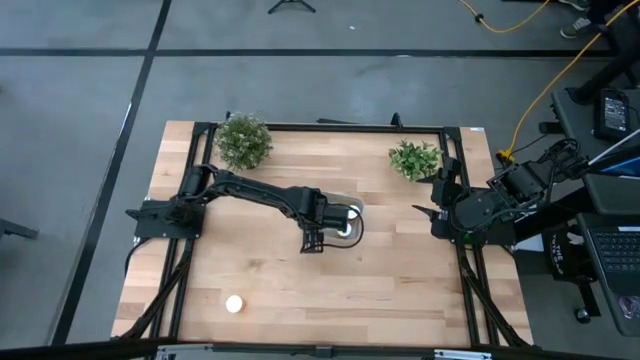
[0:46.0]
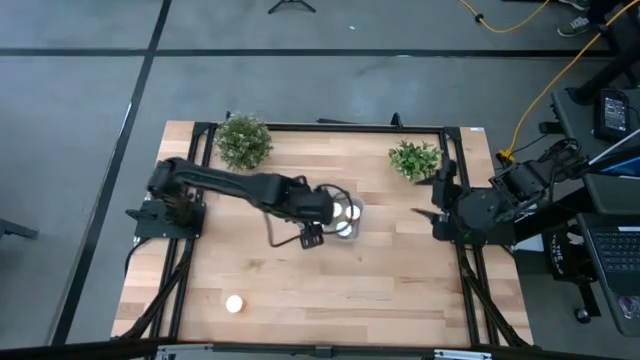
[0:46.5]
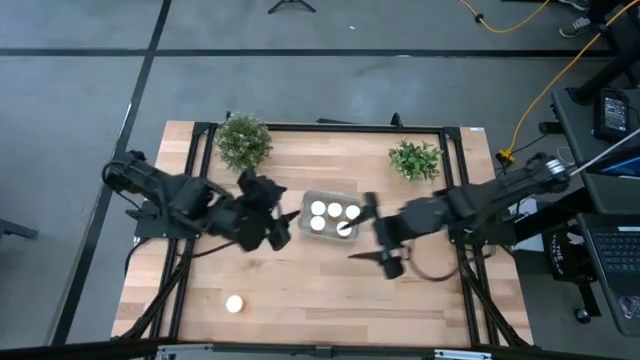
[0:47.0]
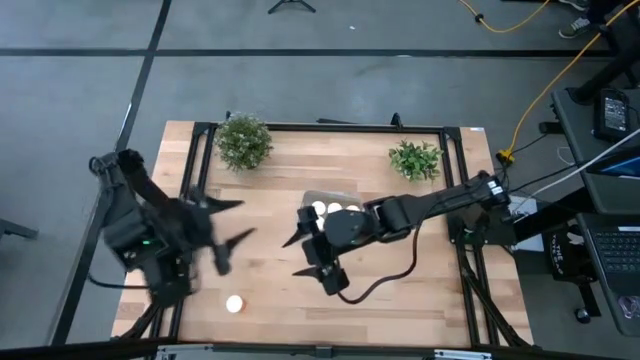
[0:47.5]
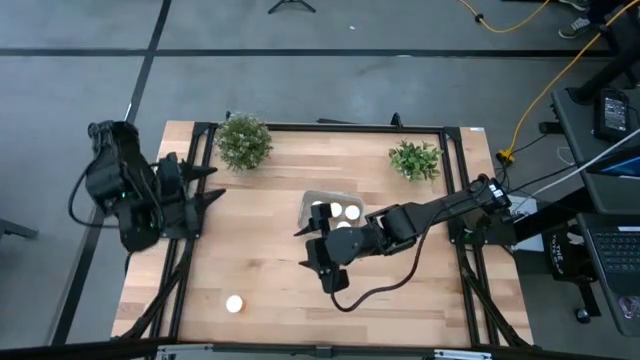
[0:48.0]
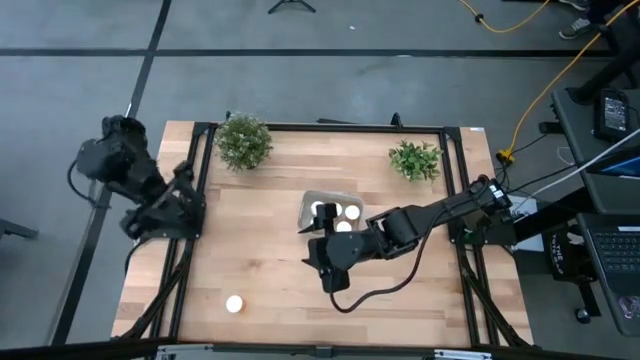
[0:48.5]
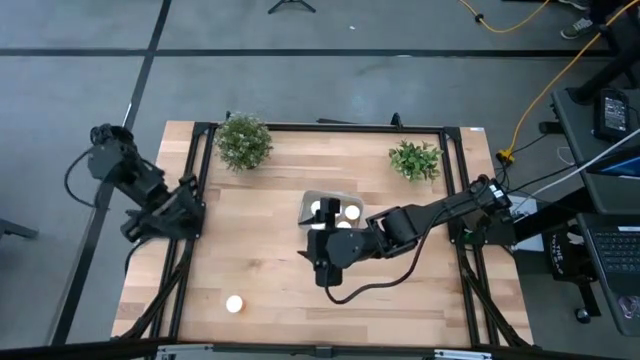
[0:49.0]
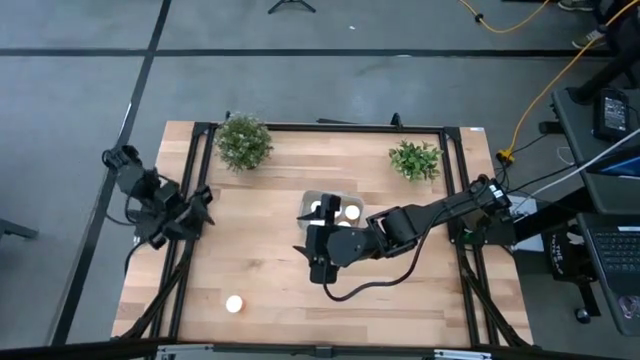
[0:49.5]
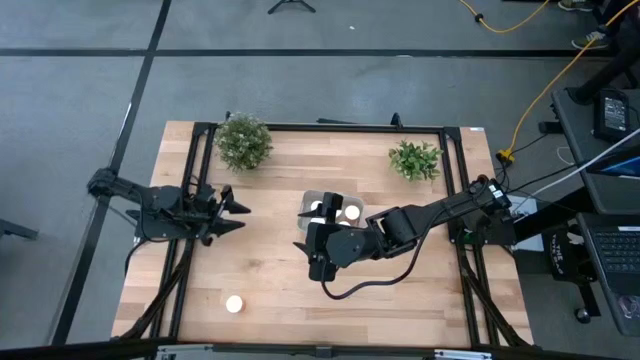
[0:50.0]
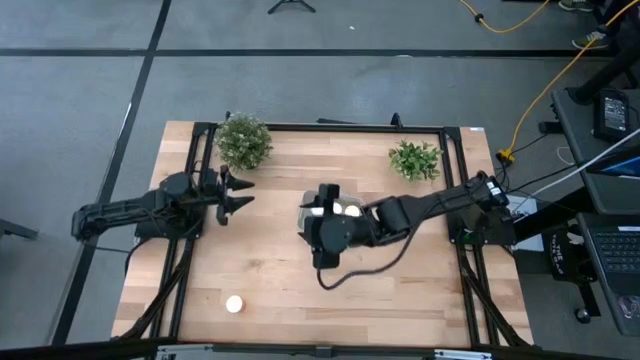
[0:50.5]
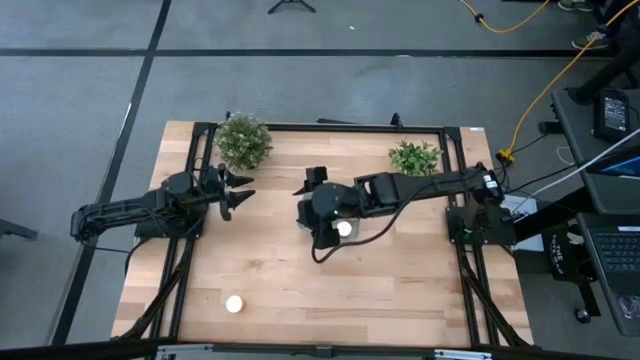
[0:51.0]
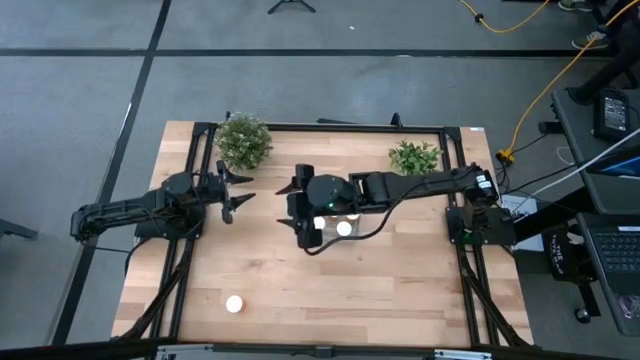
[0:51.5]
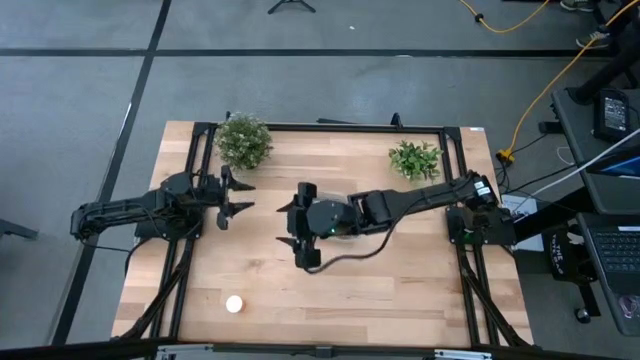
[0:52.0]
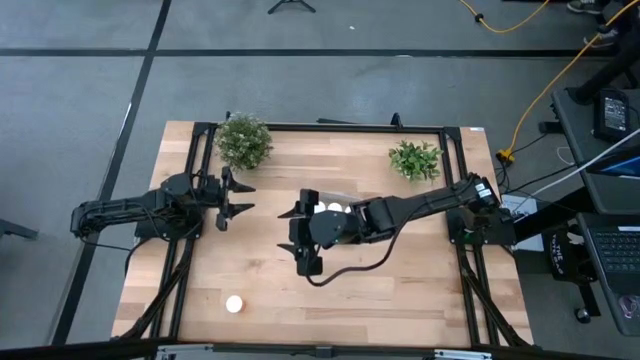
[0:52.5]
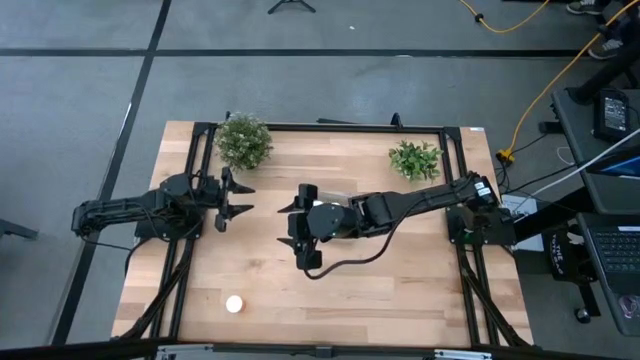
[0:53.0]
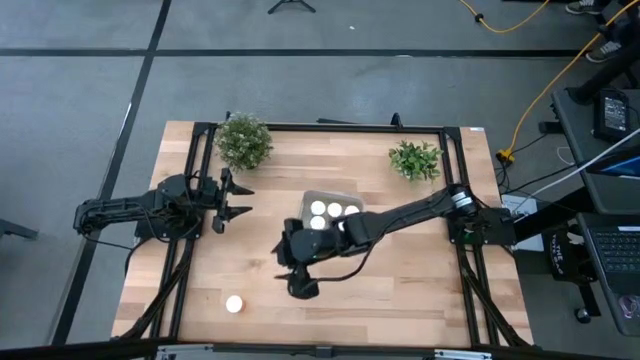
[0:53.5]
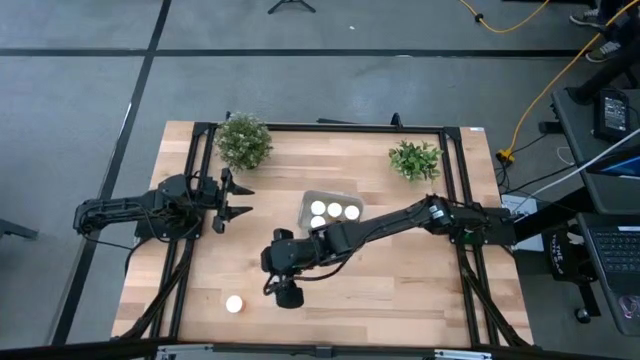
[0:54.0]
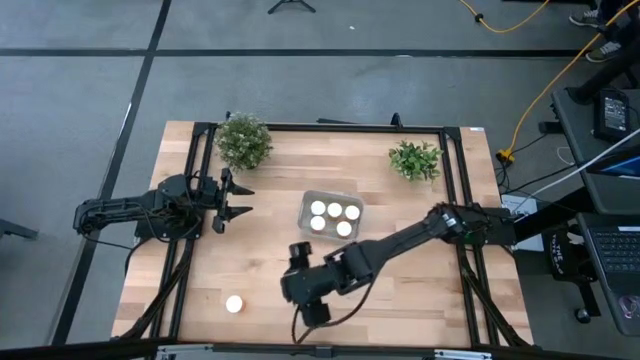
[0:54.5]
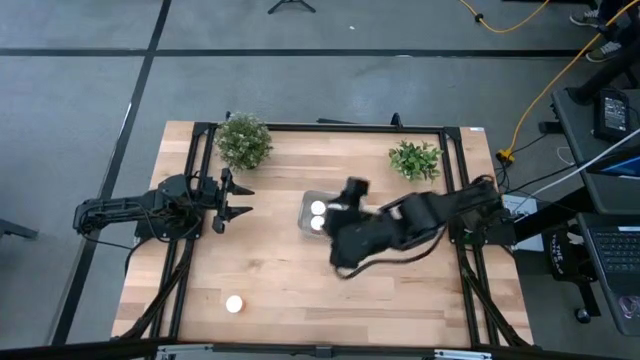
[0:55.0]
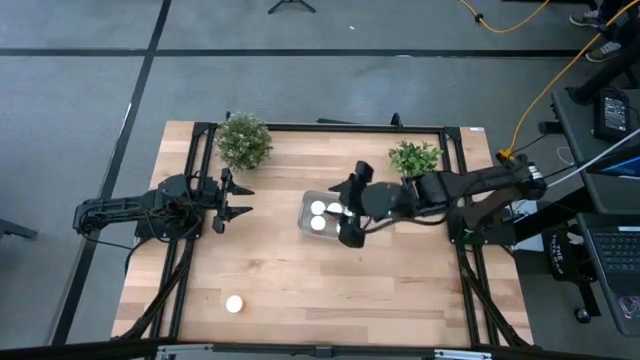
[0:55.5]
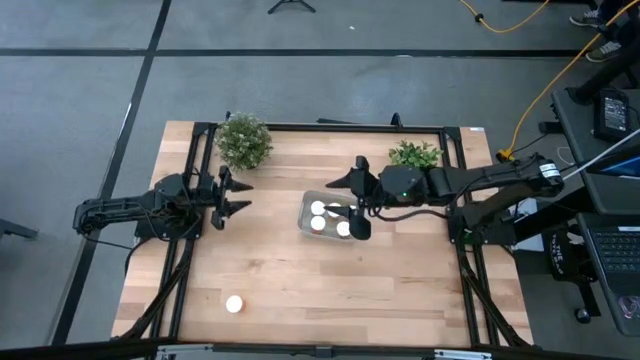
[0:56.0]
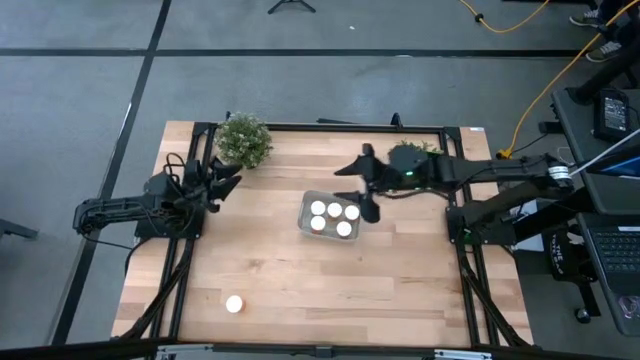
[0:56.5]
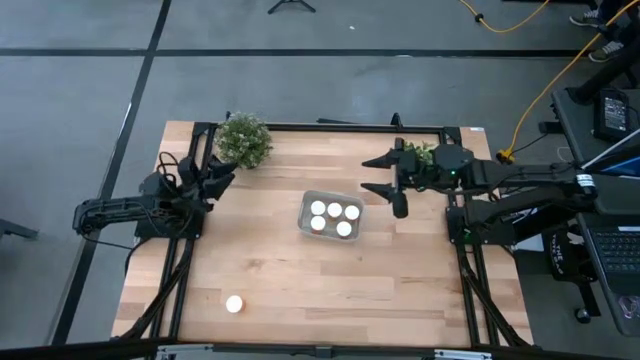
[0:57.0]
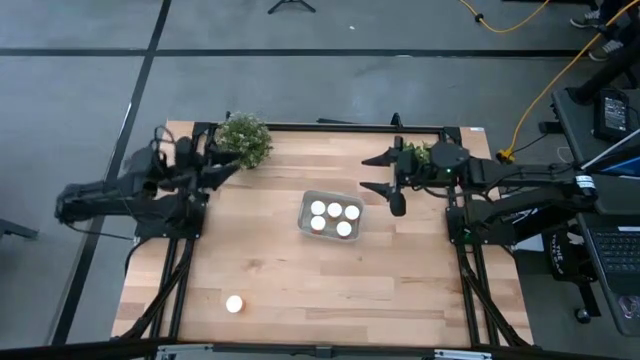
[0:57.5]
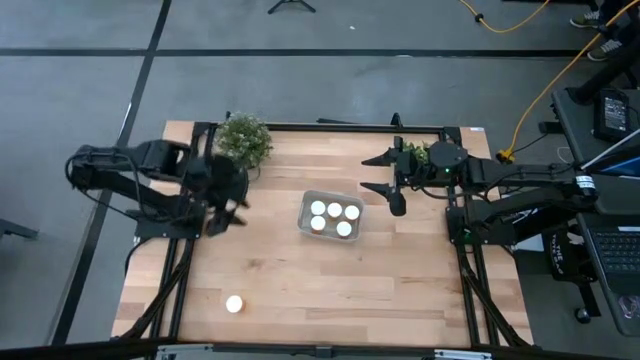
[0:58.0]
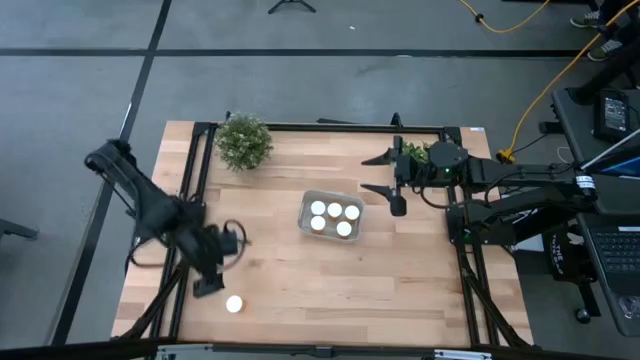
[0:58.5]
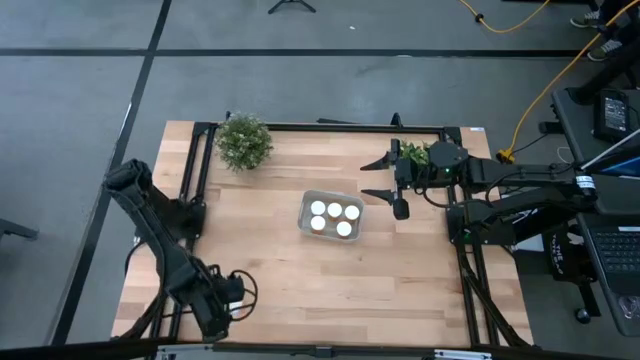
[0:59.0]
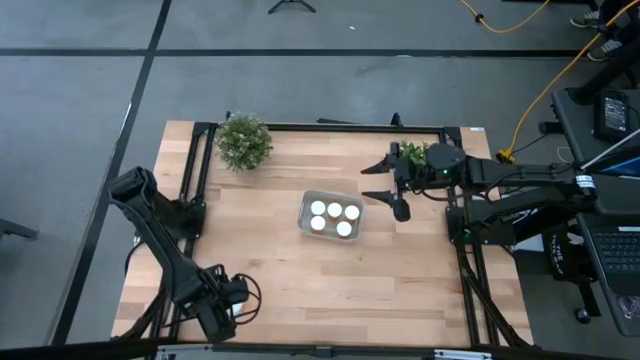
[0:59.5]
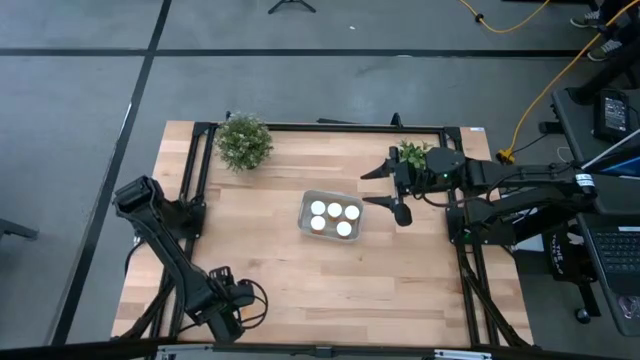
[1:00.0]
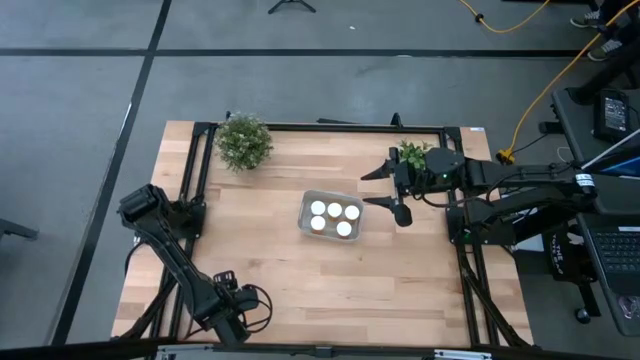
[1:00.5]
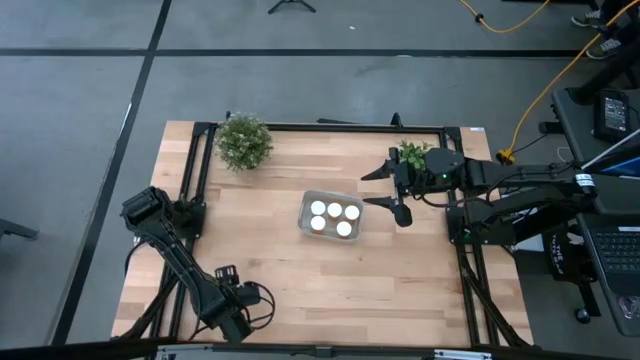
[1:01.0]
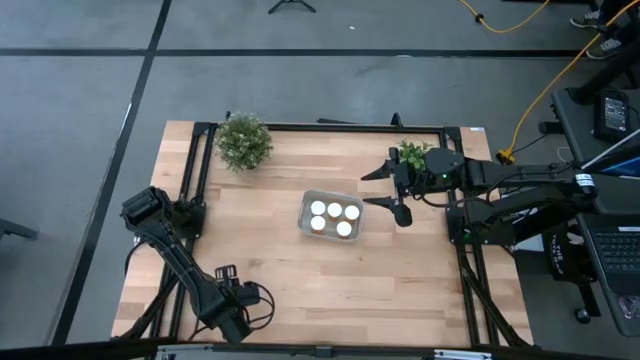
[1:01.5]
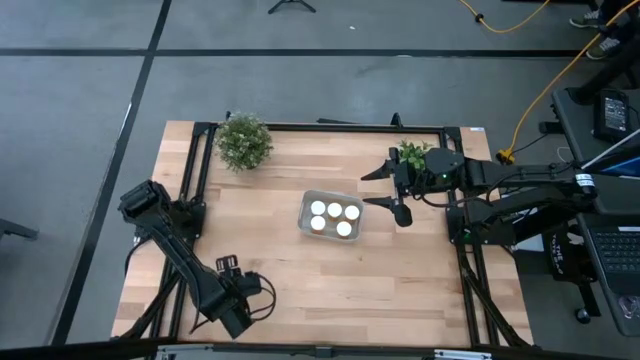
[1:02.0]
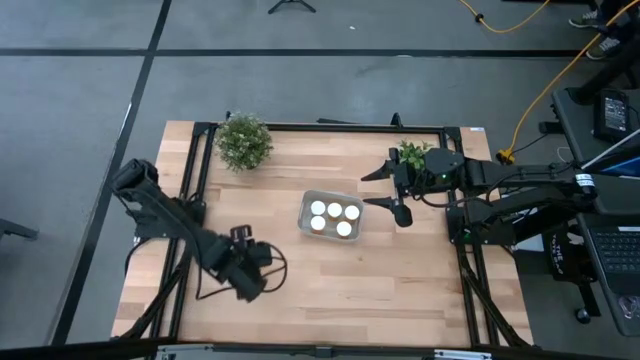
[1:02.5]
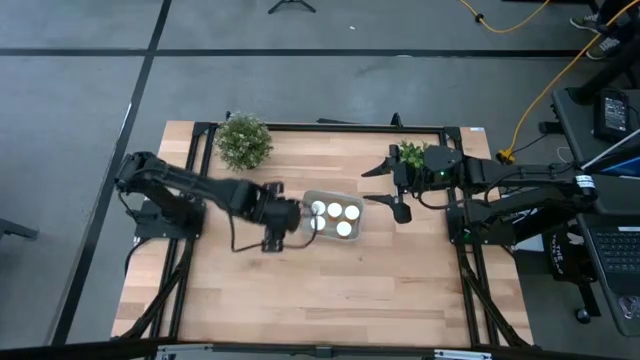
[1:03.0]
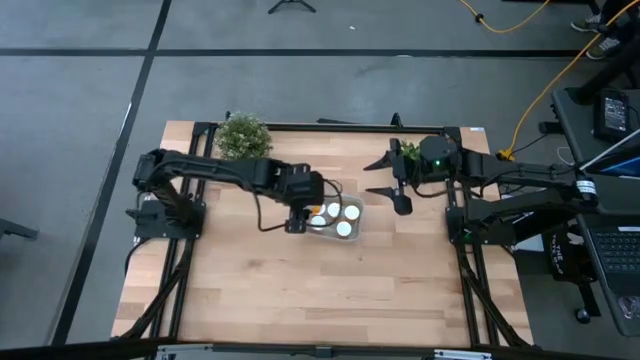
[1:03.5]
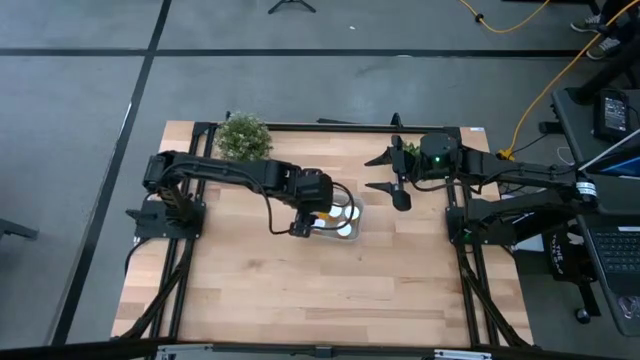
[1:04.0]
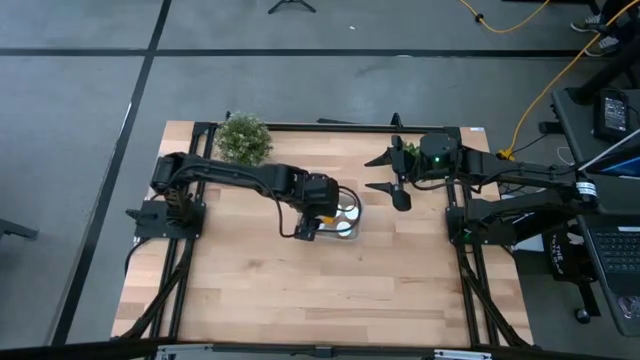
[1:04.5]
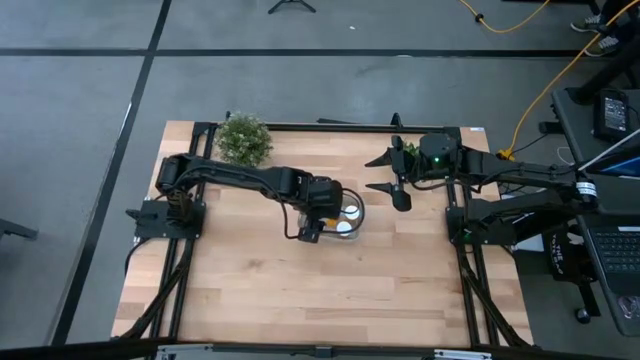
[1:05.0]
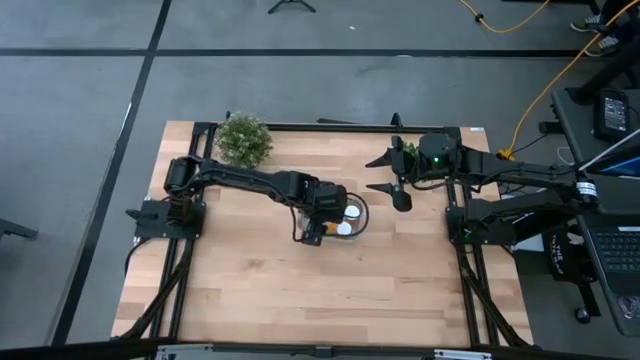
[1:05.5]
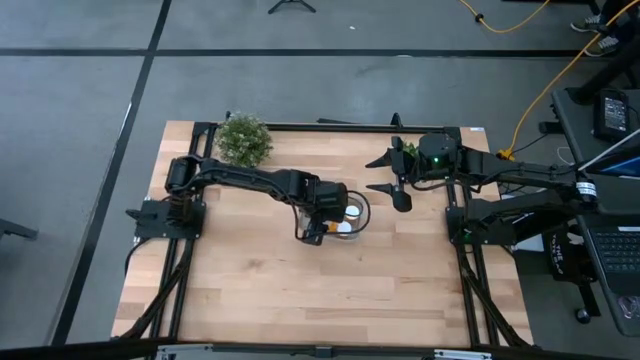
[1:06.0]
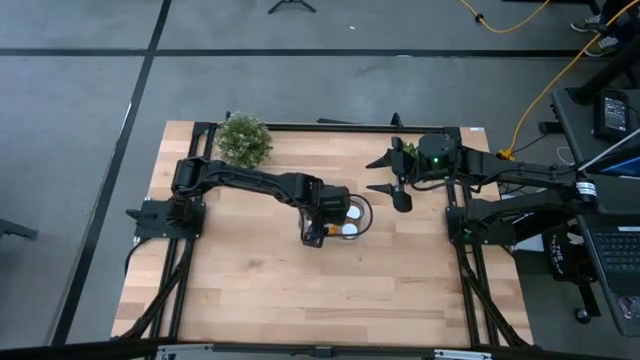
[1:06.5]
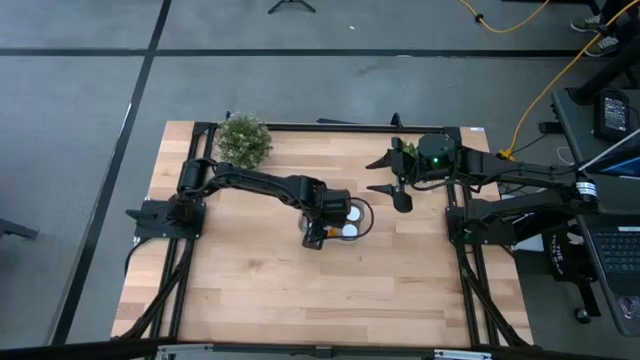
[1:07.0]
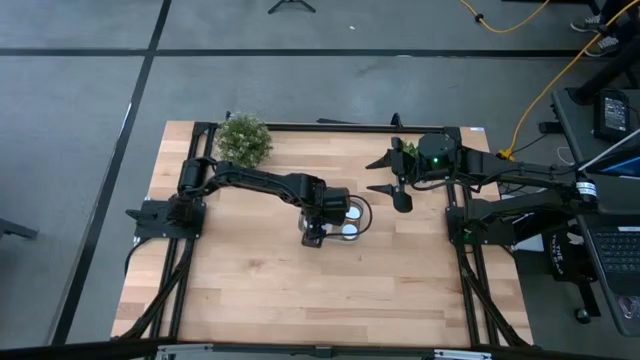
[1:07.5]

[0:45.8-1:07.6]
Task: Pick and place pill bottles into a basket
Put the orange pill bottle into the grey bin
